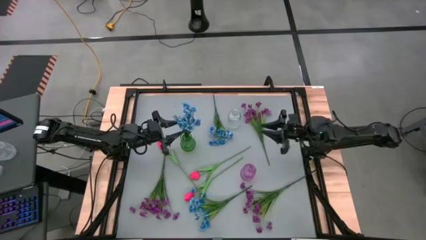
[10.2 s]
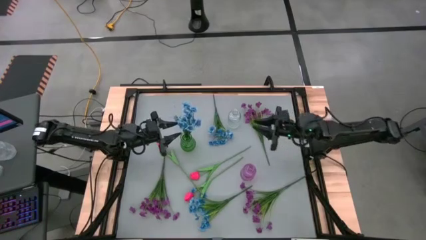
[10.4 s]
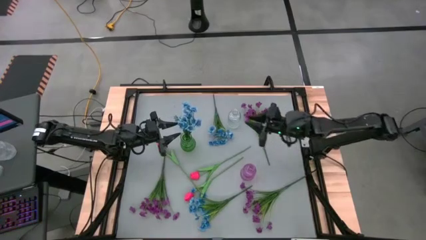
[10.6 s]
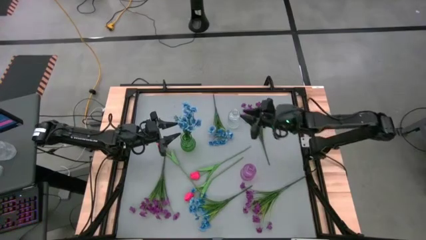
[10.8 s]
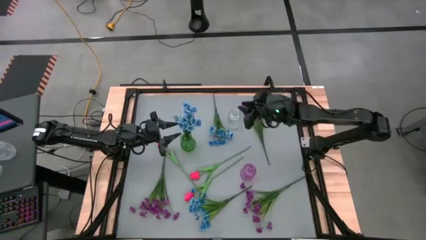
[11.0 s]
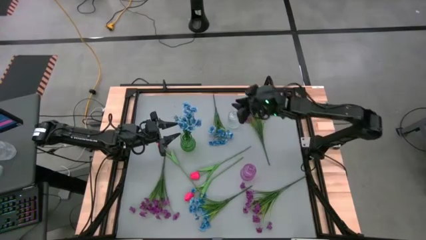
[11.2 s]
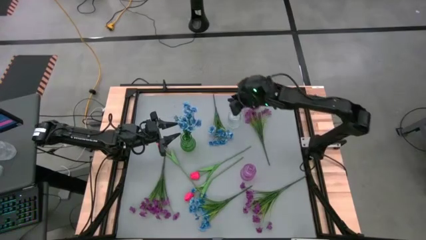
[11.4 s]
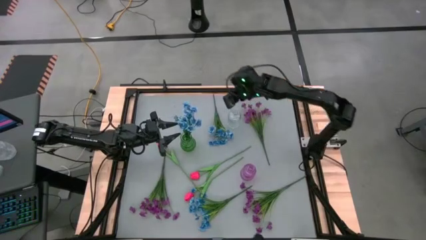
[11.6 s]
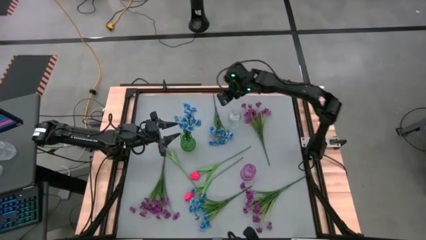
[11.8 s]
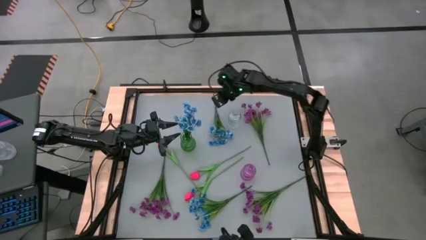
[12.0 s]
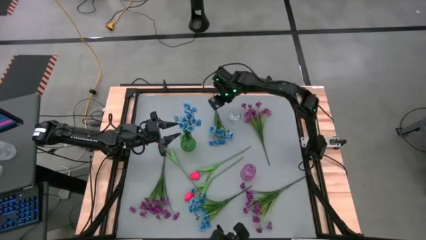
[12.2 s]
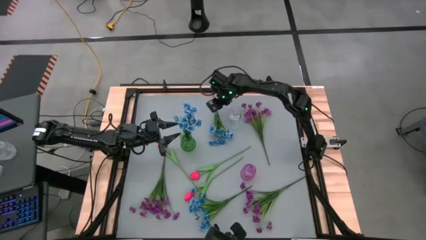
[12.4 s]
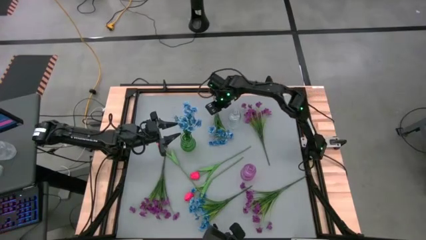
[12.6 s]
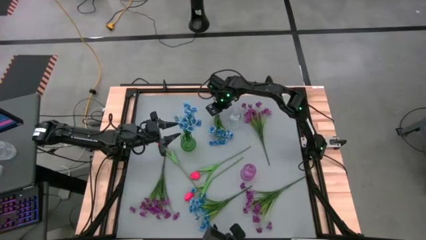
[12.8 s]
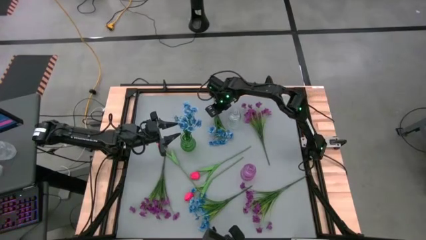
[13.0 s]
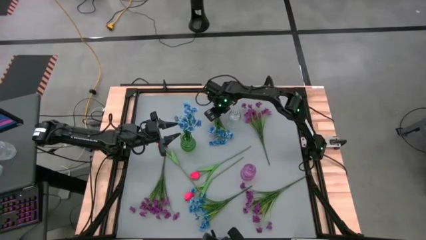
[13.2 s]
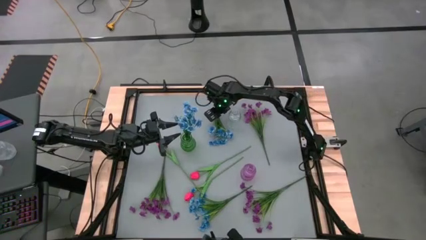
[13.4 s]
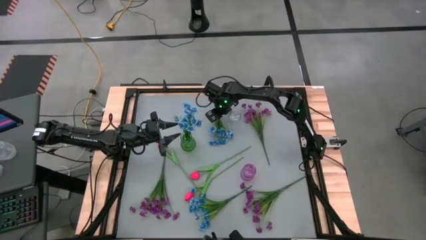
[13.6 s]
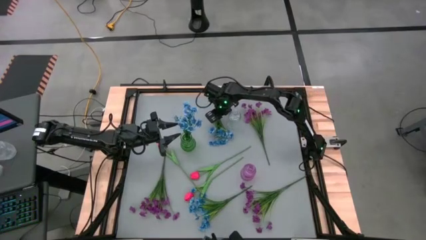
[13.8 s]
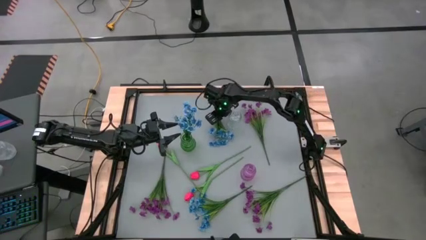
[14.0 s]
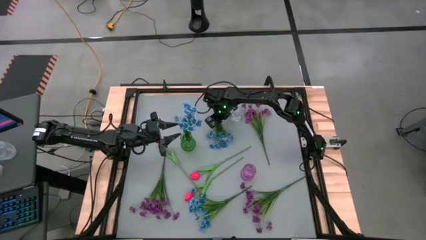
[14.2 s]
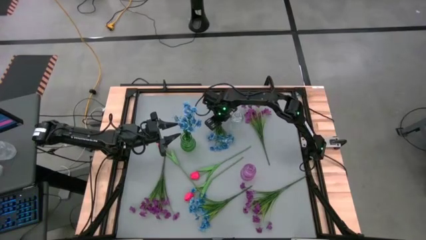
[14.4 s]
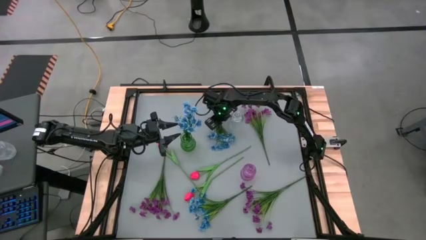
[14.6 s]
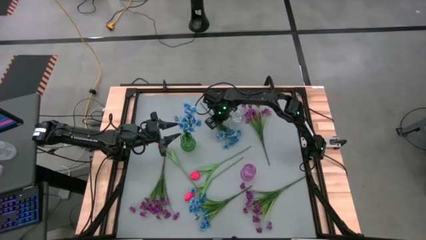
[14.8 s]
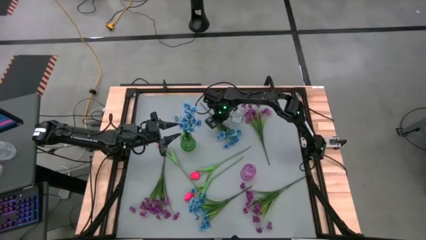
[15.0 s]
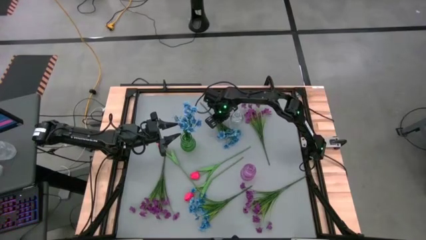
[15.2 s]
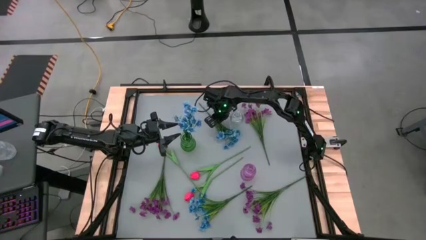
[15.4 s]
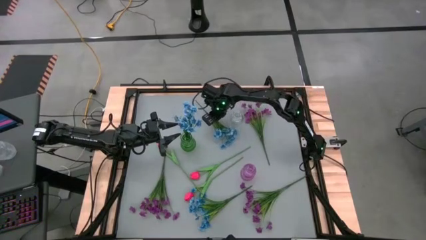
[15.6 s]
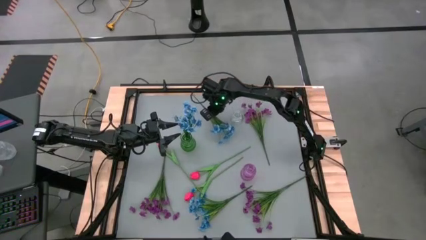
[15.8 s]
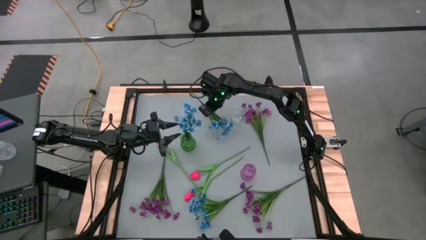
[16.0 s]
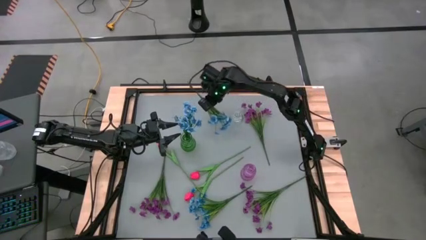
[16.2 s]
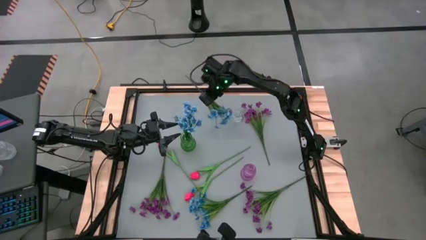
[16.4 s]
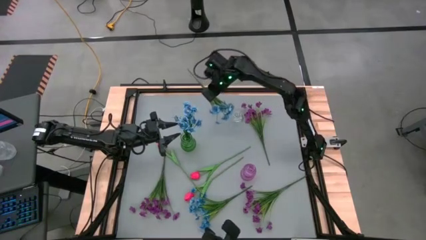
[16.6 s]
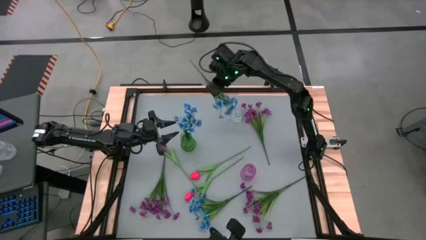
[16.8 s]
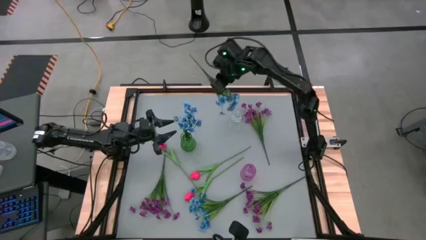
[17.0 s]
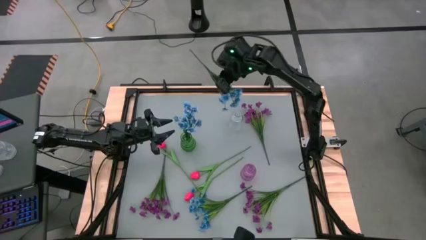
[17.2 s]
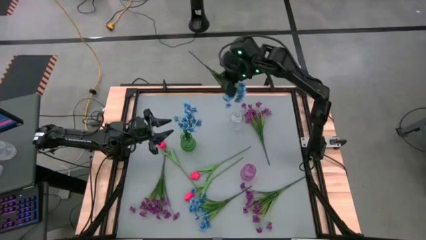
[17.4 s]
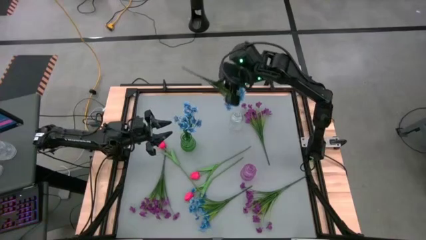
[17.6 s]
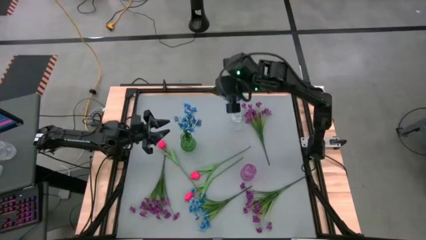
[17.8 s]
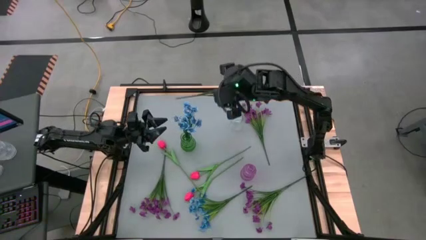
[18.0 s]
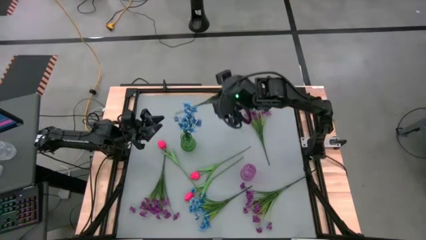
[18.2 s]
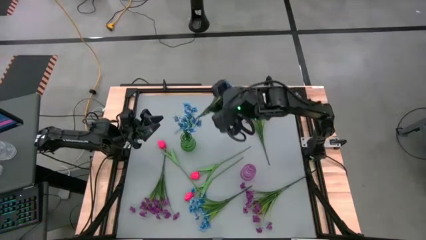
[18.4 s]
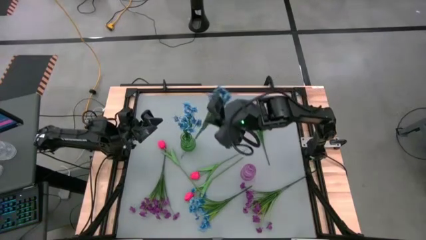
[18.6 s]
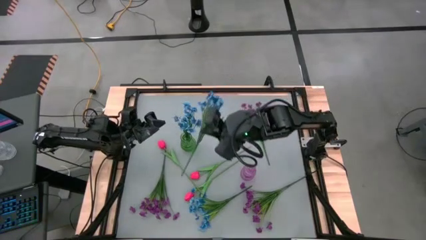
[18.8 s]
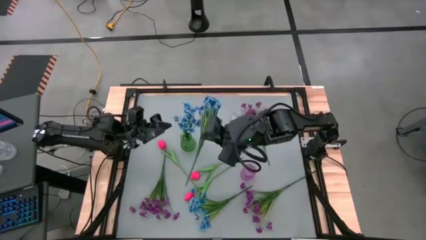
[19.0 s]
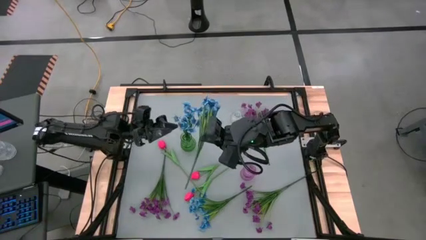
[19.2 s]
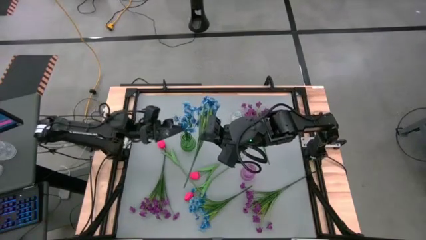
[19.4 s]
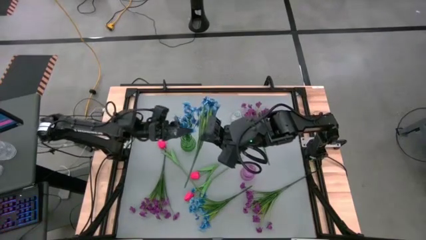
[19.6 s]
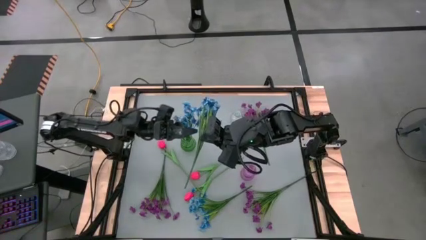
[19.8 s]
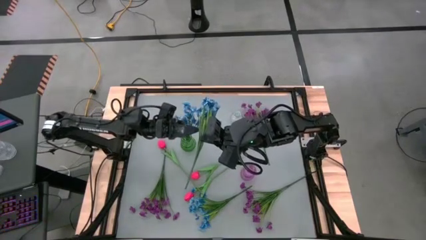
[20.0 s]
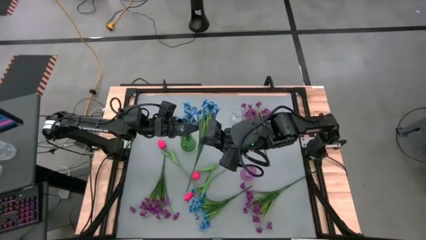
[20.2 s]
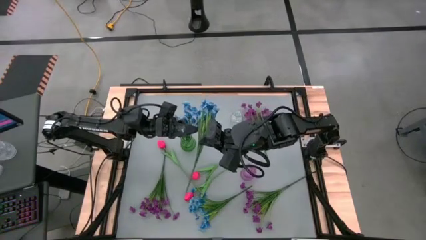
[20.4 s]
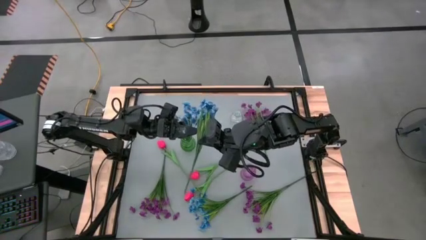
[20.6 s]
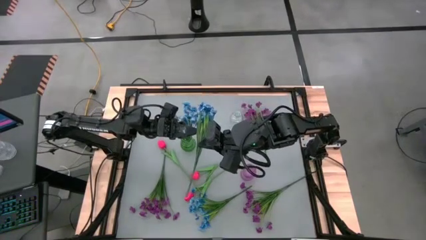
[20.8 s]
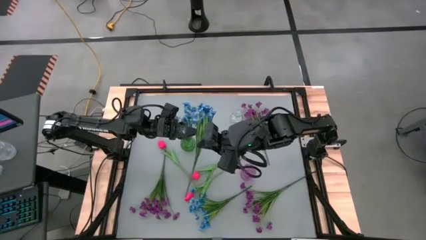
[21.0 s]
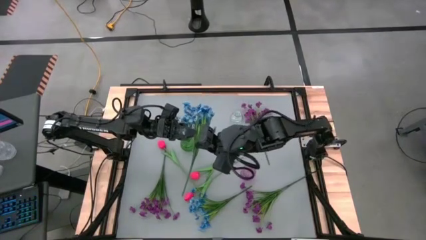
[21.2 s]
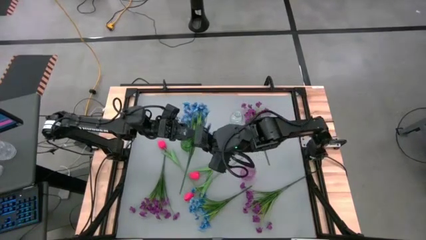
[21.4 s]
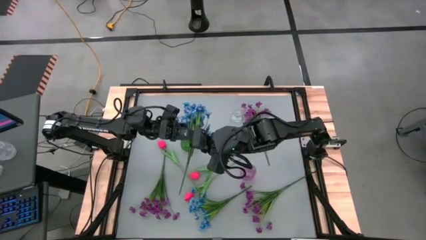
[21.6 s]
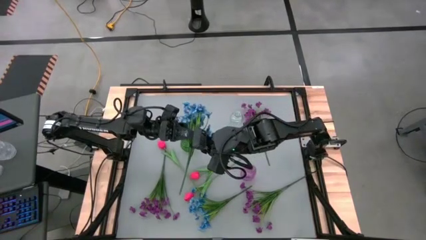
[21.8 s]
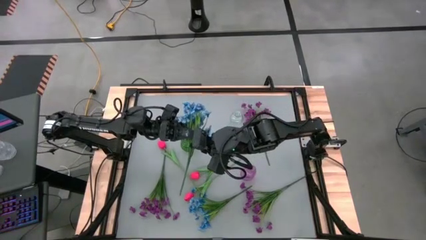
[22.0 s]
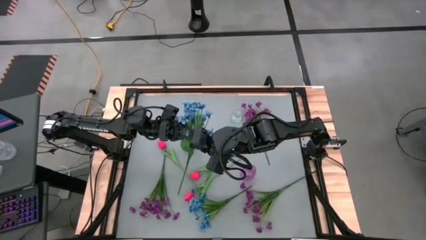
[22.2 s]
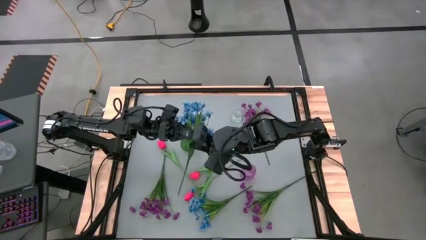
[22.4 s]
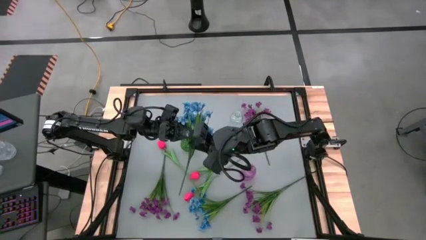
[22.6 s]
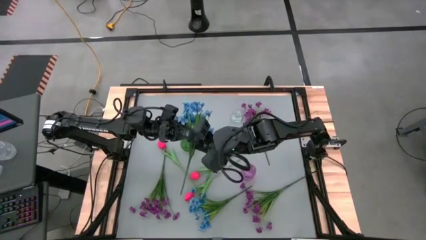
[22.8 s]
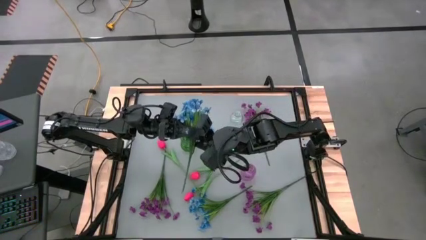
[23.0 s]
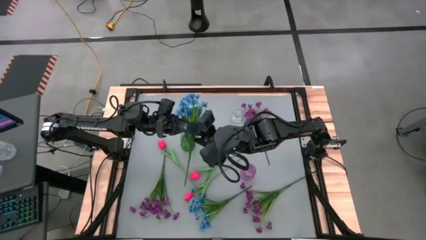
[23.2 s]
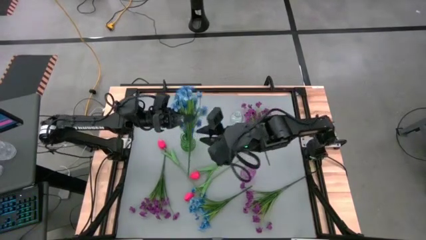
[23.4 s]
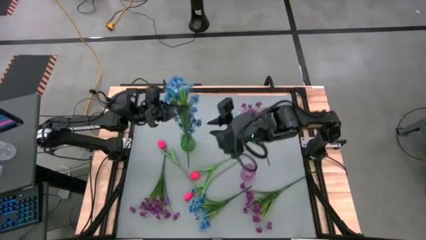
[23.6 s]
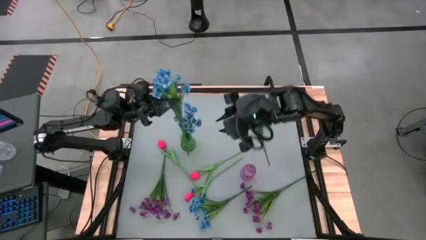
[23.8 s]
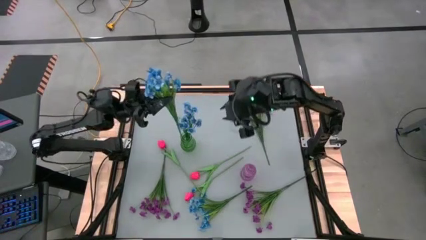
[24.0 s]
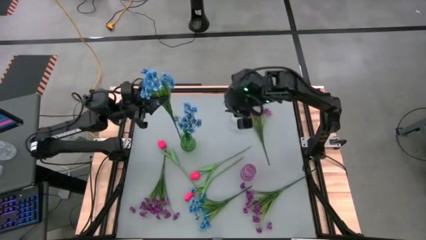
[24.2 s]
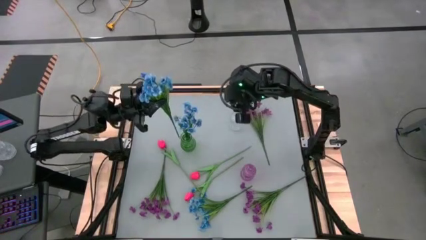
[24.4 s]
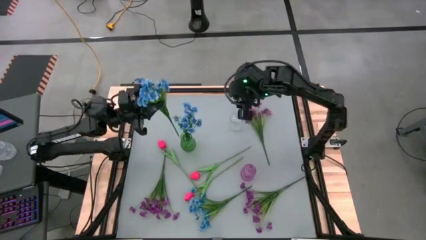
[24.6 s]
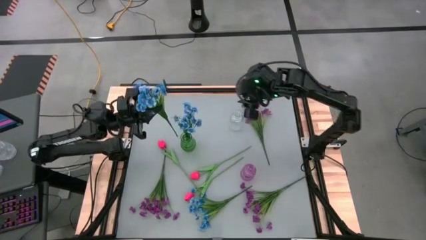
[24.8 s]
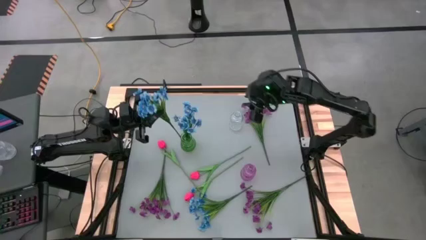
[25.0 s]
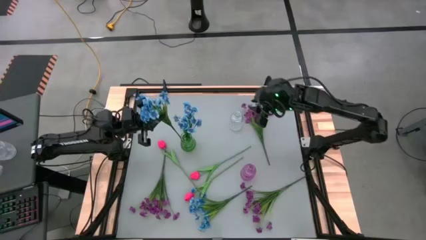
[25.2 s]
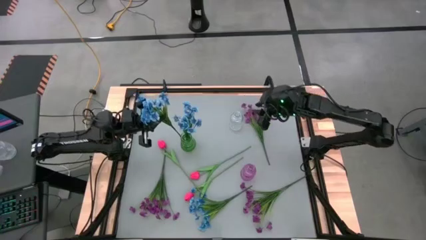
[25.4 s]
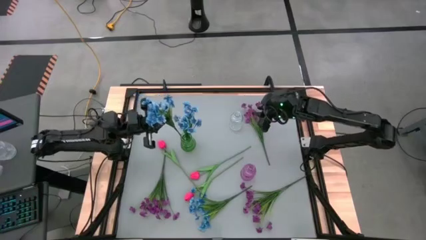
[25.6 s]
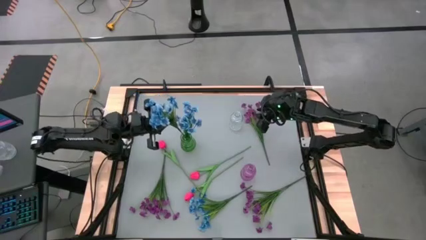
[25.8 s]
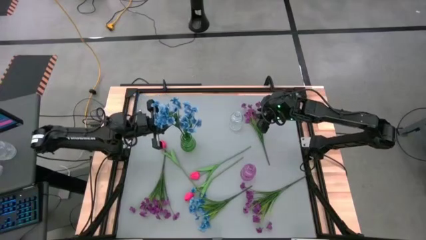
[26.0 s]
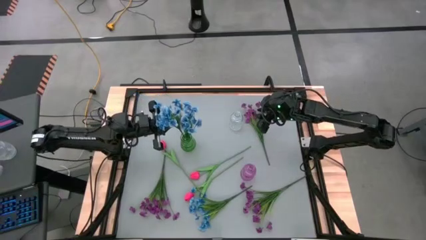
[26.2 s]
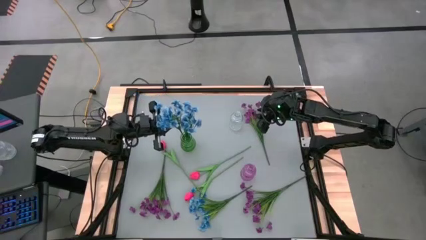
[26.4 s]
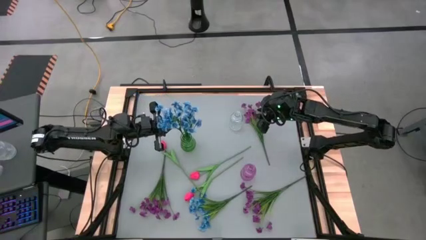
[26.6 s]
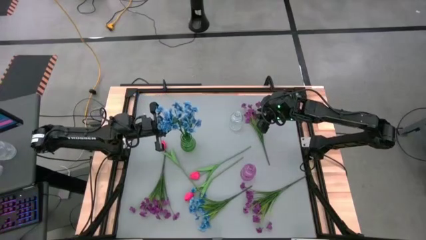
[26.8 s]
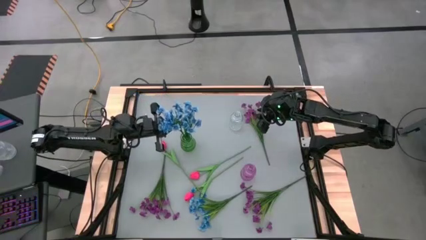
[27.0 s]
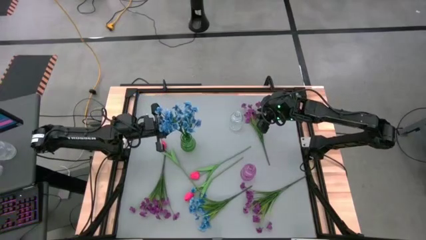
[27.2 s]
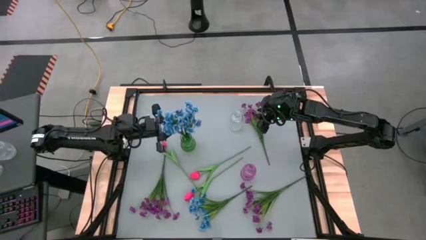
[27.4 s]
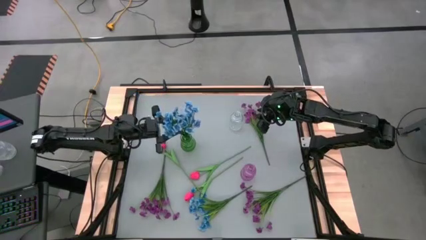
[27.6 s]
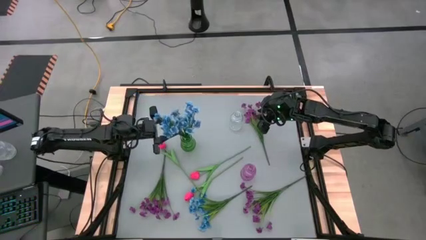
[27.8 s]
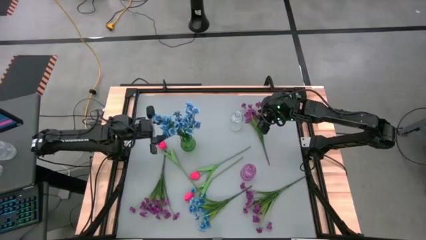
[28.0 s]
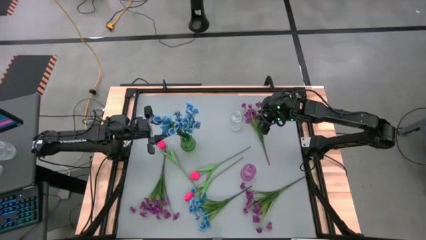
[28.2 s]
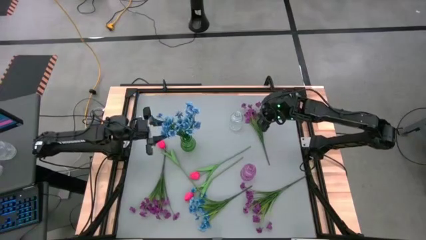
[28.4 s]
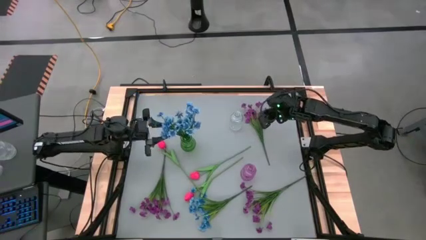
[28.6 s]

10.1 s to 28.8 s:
Task: Sort flowers into vase by color
Put the top blue flowers into the green flower vase
